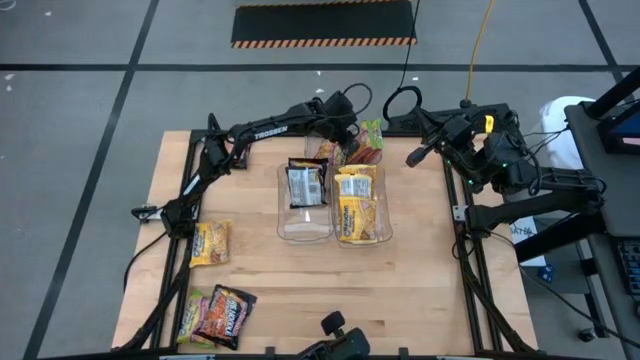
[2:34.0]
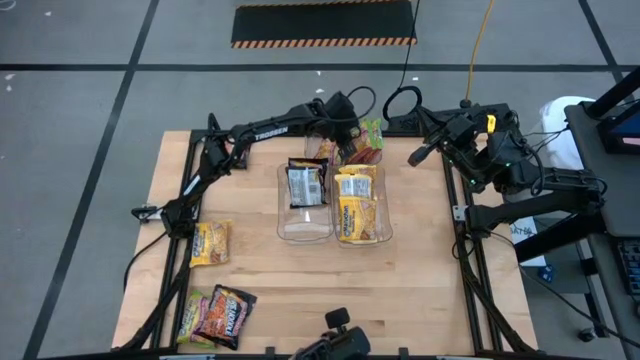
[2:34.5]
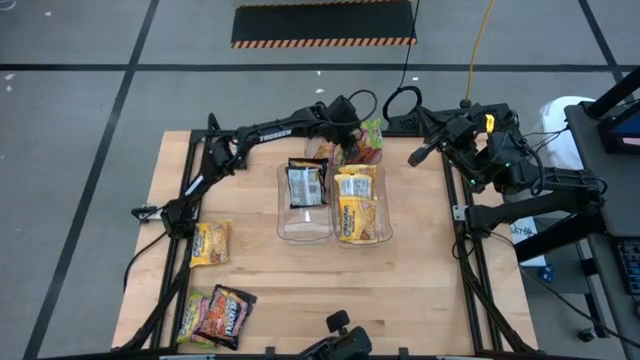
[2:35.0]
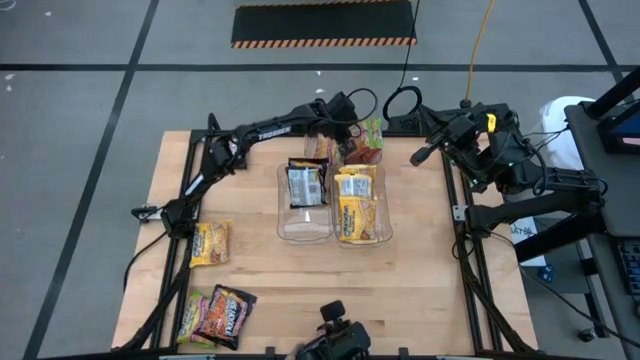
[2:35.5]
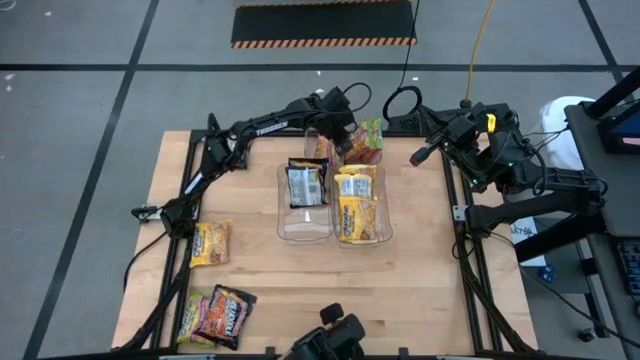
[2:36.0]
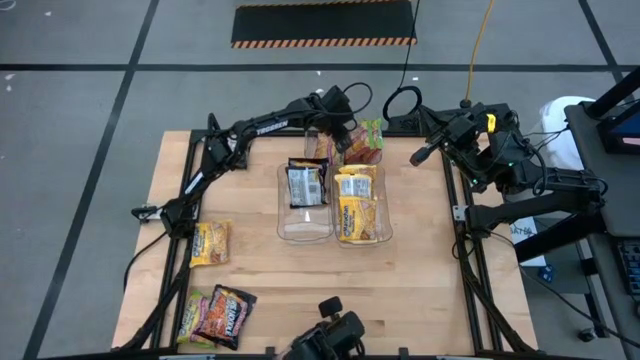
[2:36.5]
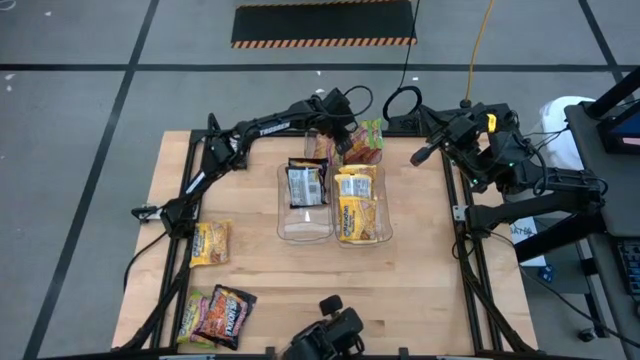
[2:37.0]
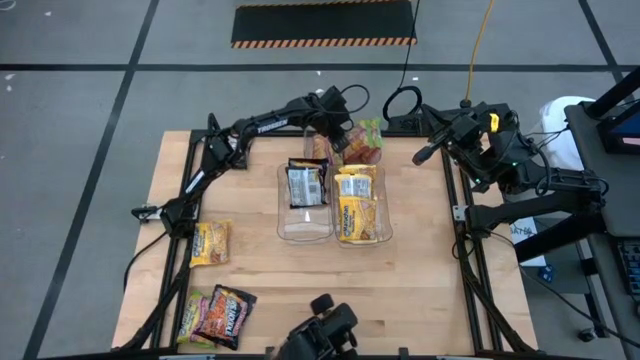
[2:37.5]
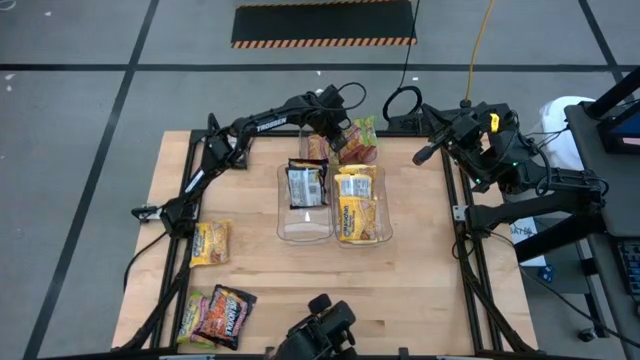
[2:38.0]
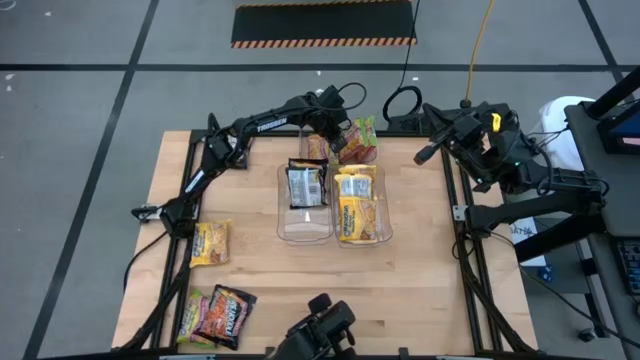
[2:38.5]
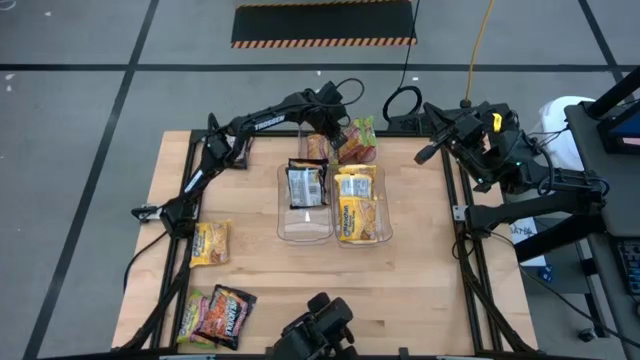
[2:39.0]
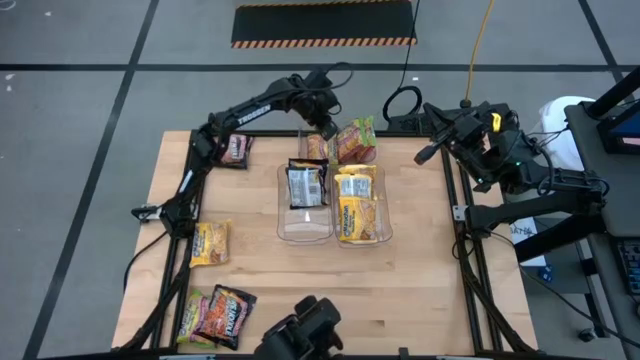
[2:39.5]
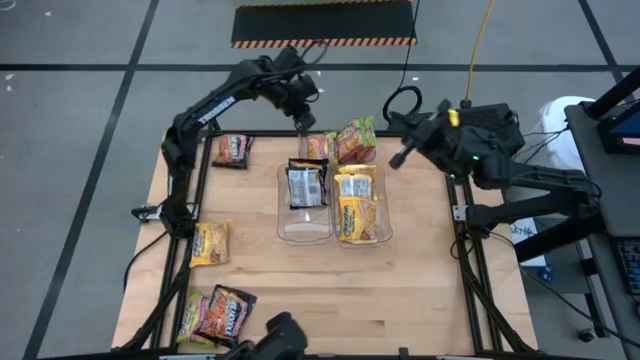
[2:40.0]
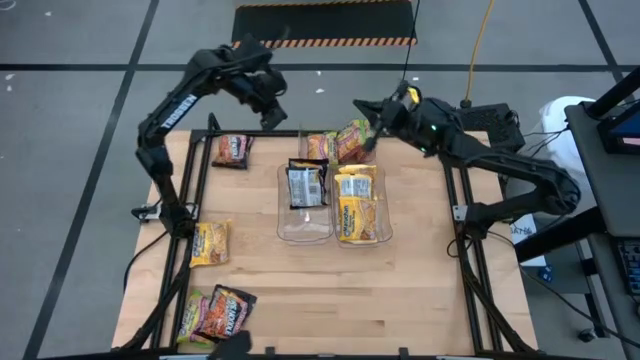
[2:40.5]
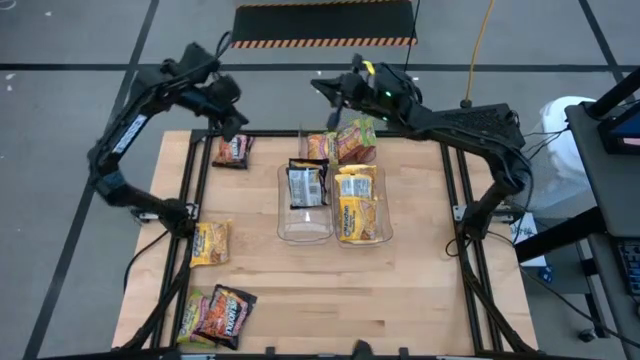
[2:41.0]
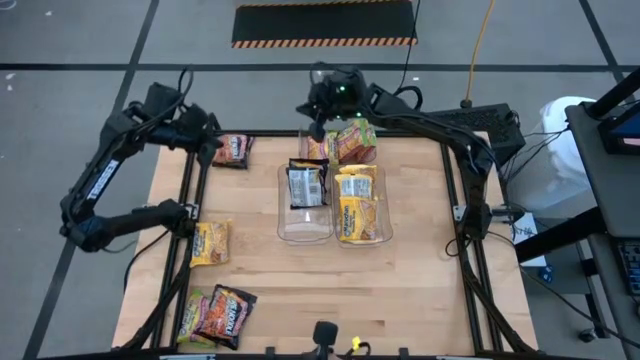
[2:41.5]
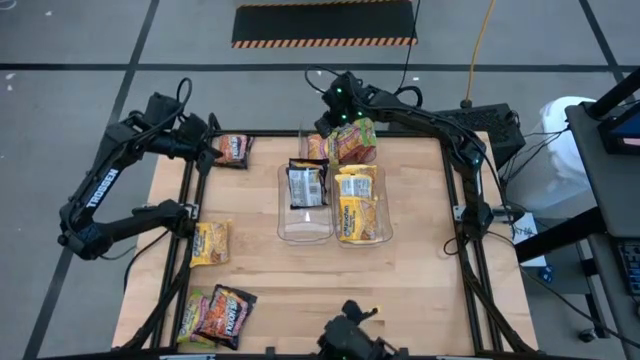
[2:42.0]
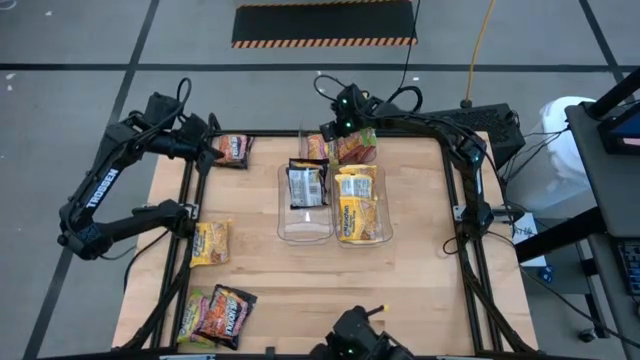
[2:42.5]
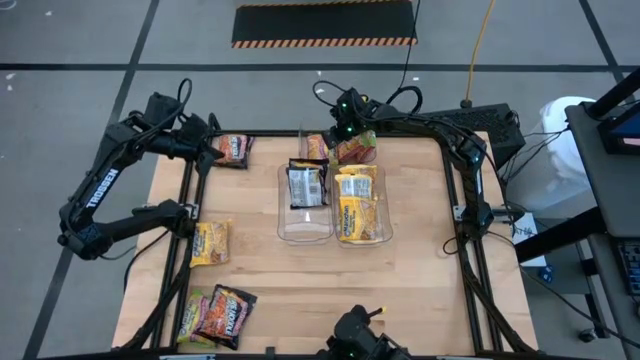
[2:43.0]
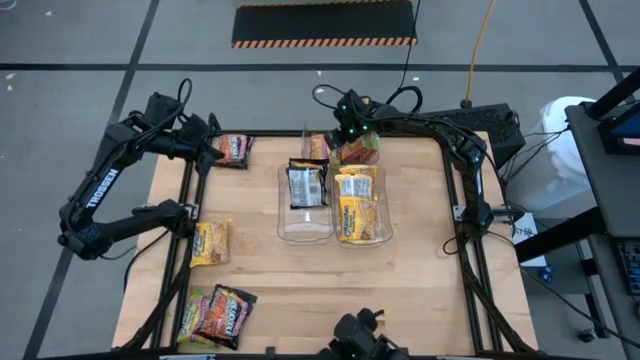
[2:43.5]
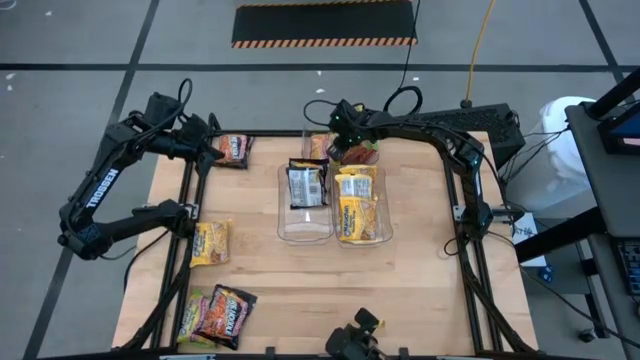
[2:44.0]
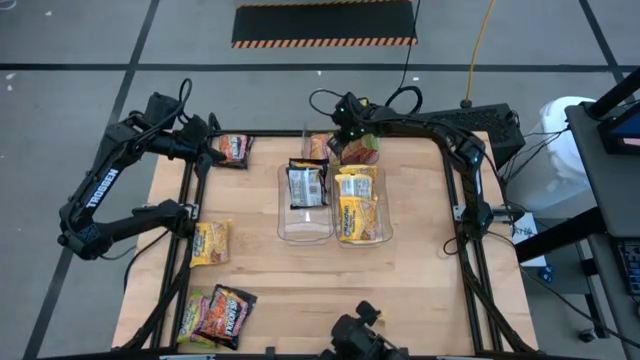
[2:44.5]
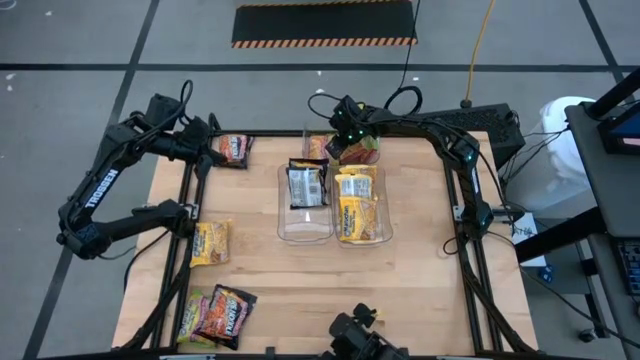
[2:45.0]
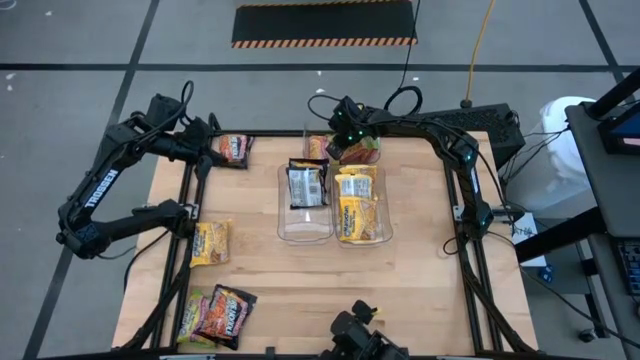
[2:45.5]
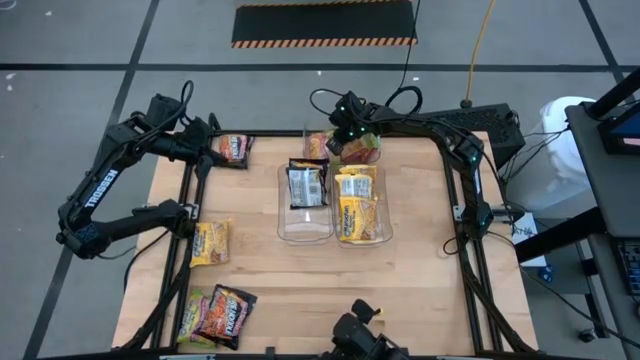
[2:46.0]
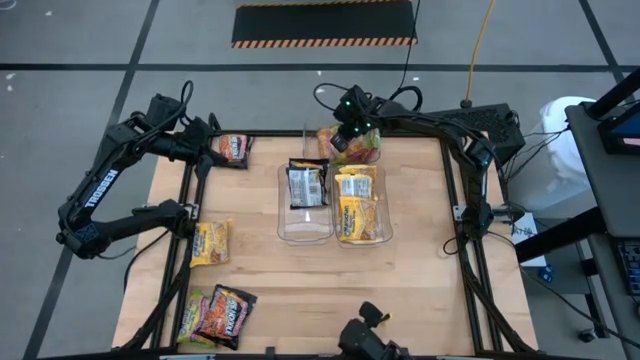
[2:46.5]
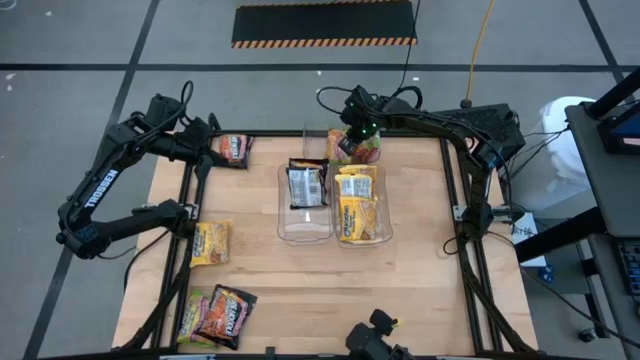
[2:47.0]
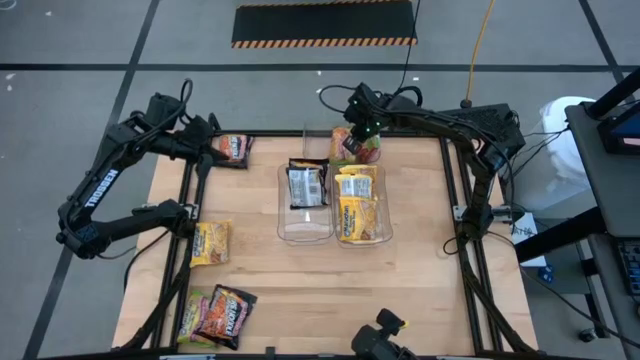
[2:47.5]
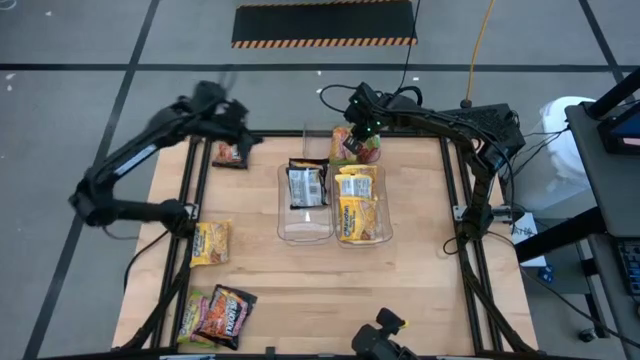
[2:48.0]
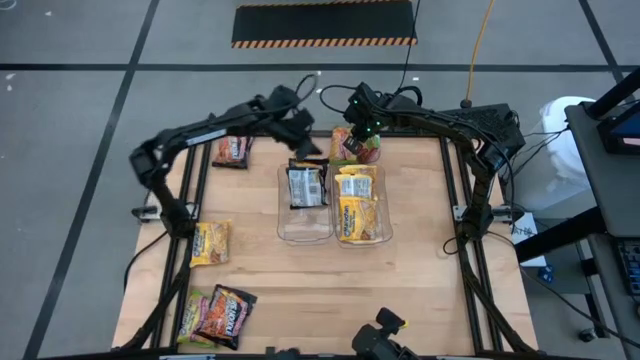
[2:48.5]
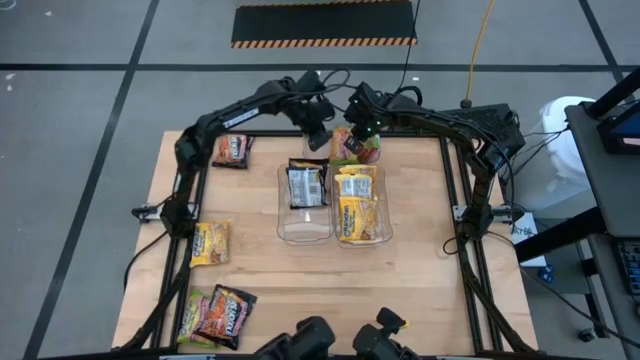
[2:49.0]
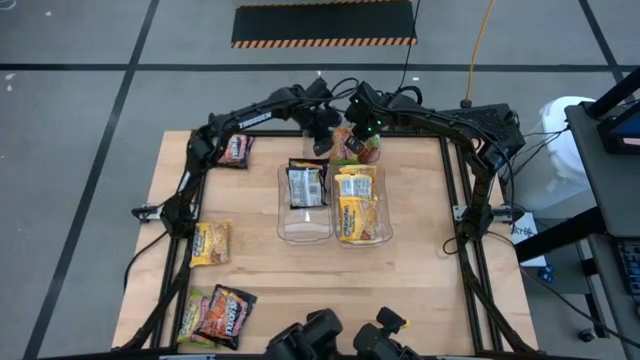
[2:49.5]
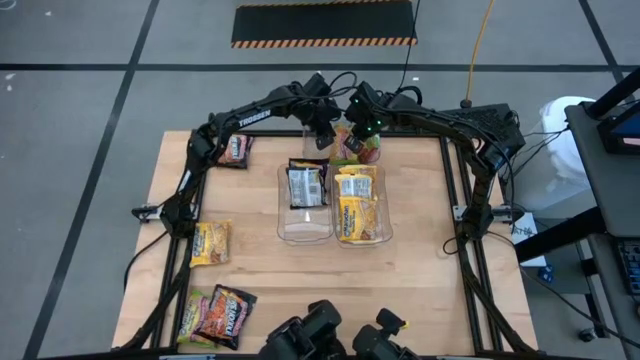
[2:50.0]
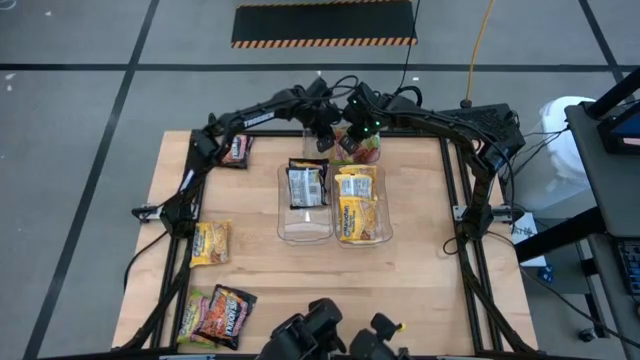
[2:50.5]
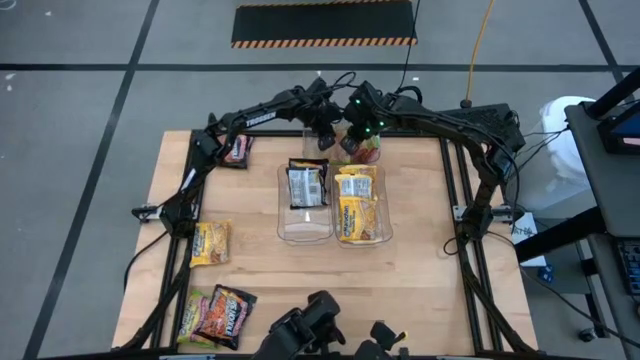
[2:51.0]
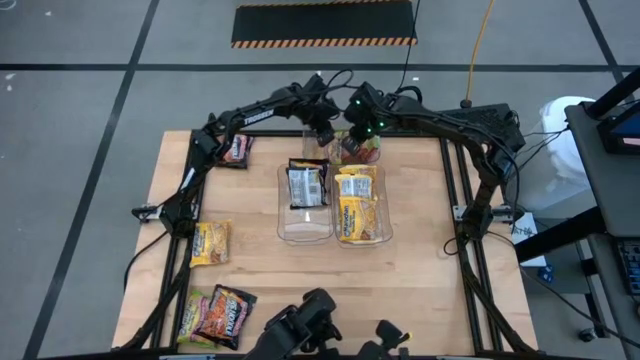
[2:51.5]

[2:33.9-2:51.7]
Task: Sort Maruchan noodles
Put the green noodle pack into the top transparent bin

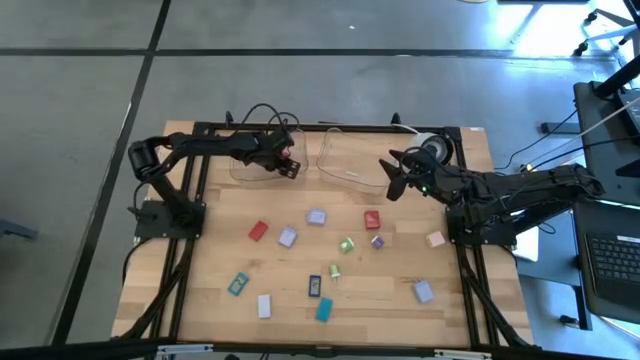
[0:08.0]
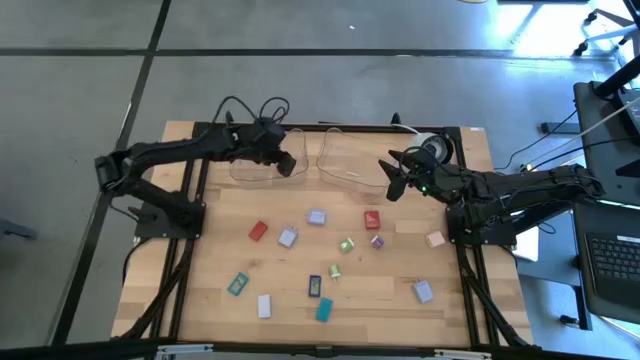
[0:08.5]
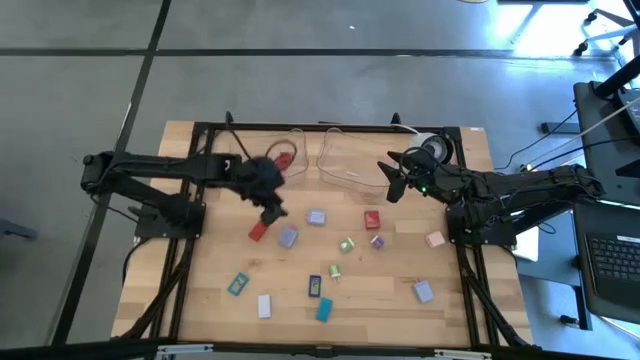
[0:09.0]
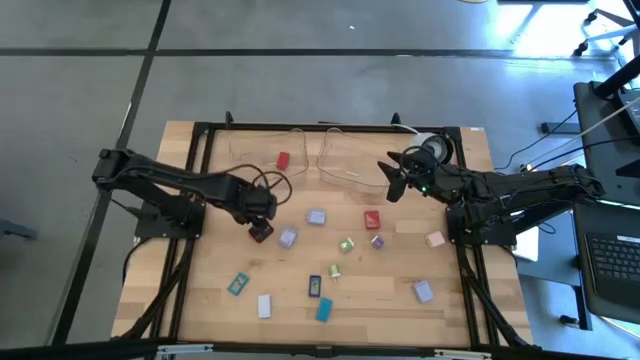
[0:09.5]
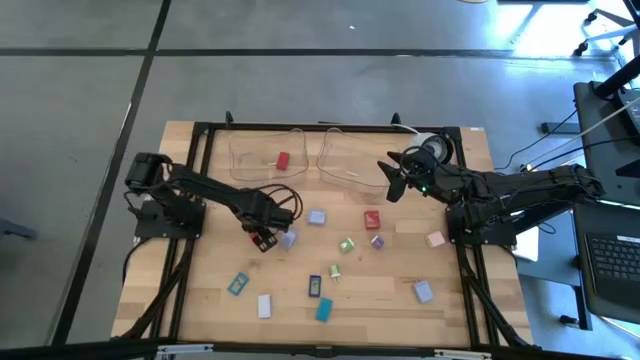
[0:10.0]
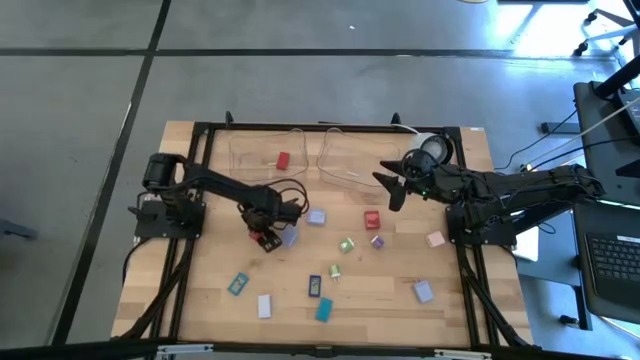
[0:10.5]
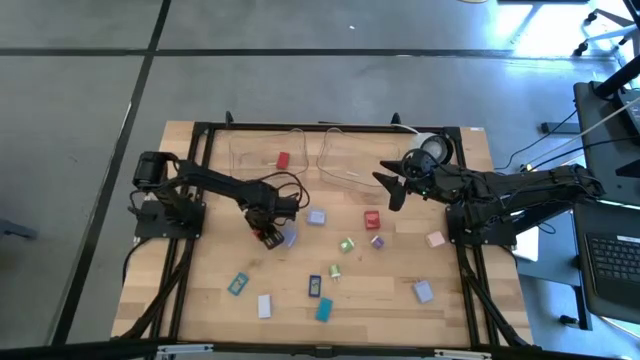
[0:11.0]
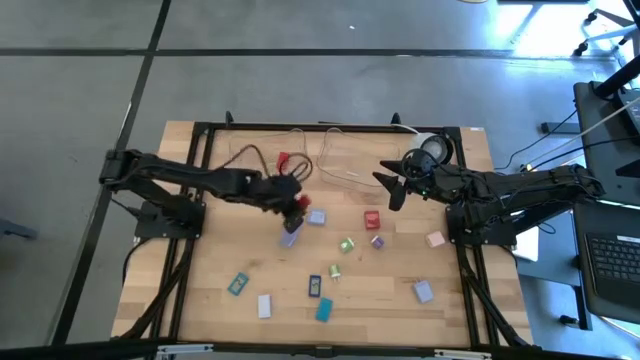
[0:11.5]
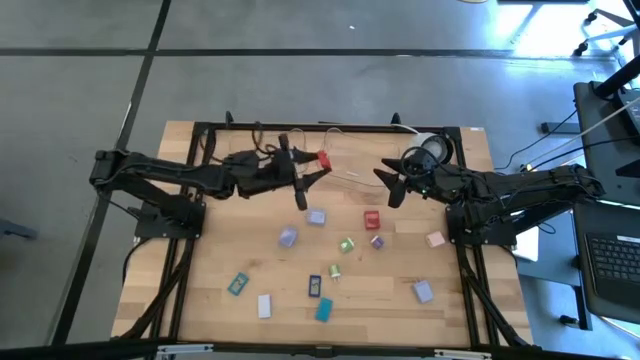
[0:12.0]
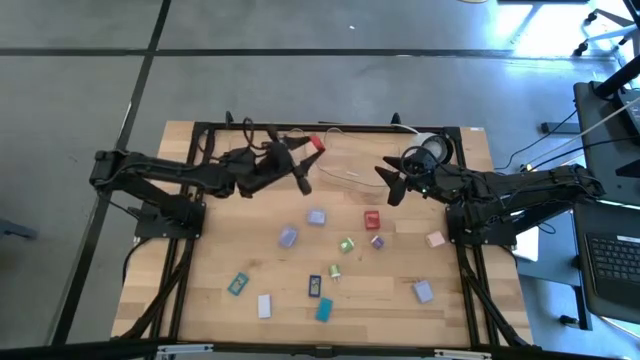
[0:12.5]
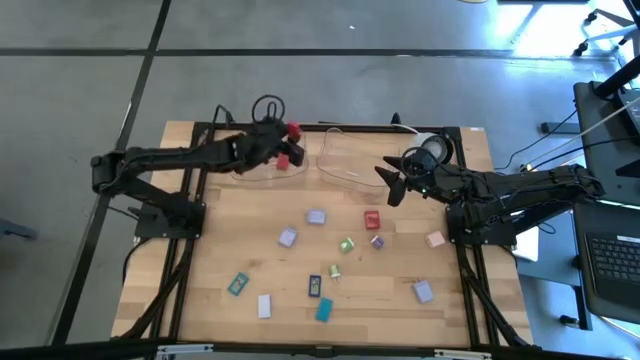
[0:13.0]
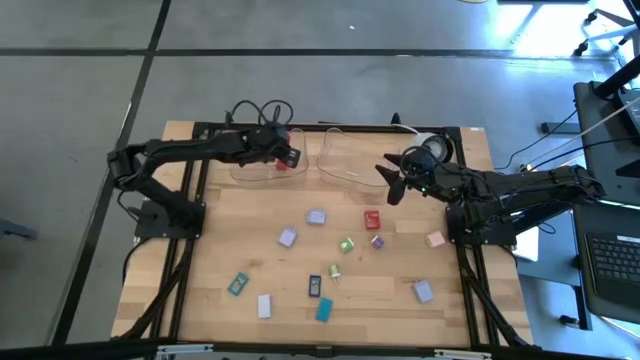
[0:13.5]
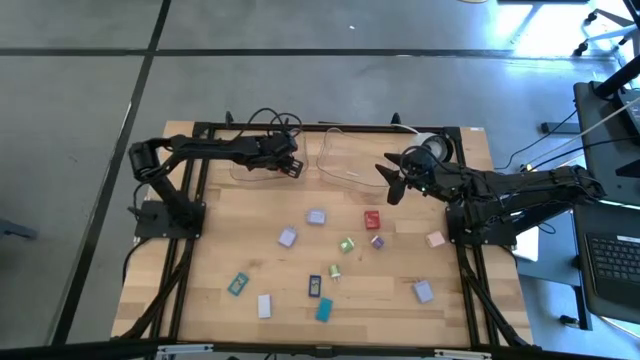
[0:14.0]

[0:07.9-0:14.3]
Task: Pick & Place Office items
Put the red digital timer into the left transparent bin
